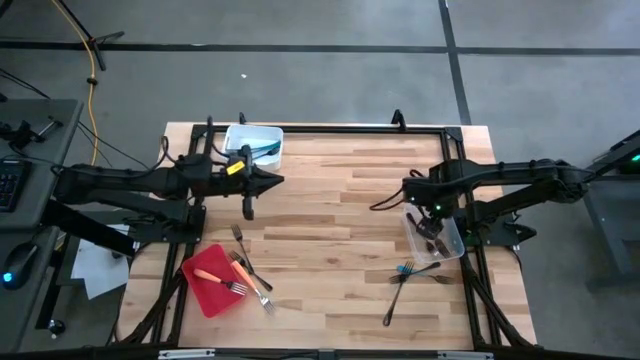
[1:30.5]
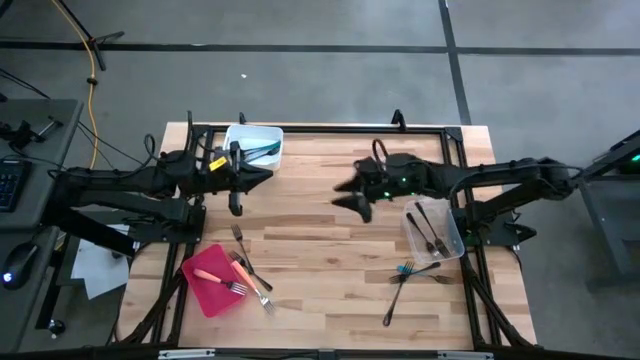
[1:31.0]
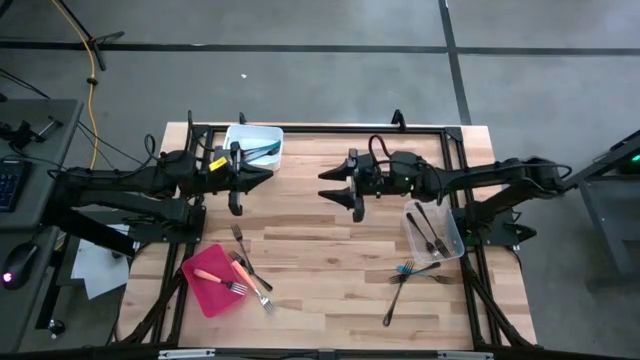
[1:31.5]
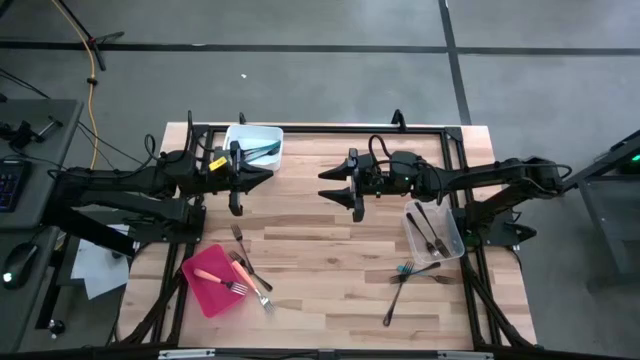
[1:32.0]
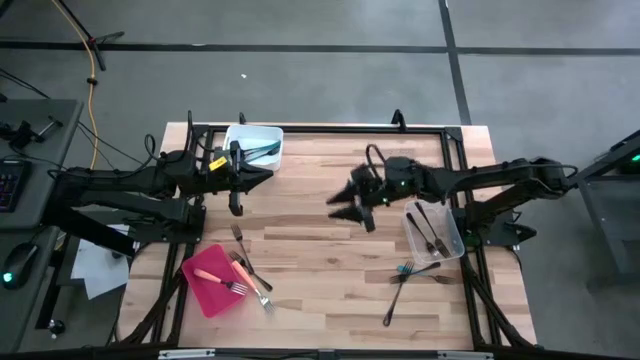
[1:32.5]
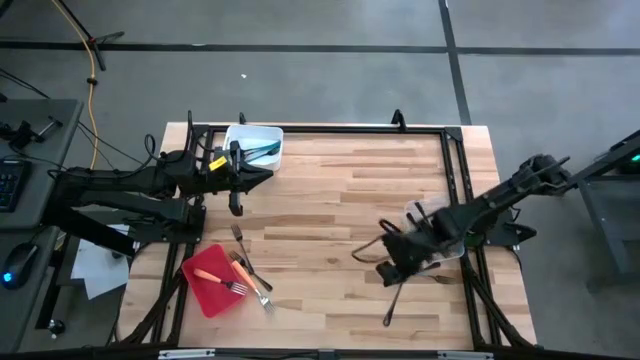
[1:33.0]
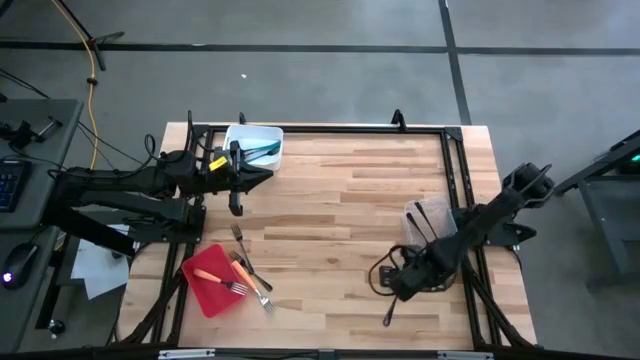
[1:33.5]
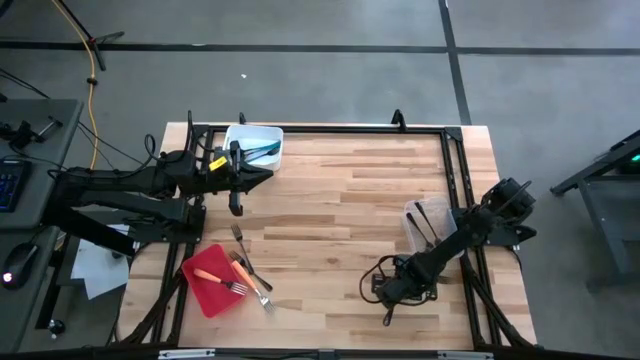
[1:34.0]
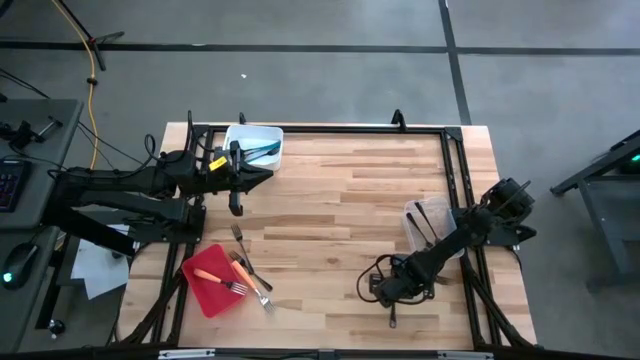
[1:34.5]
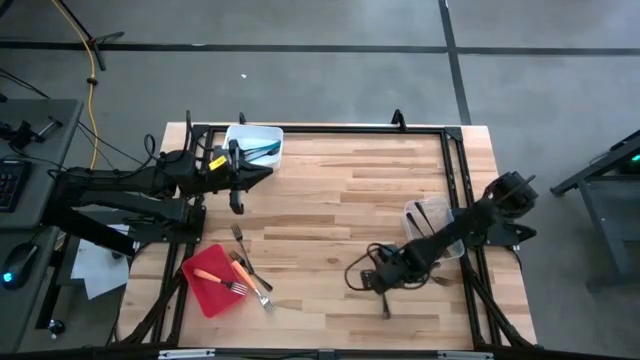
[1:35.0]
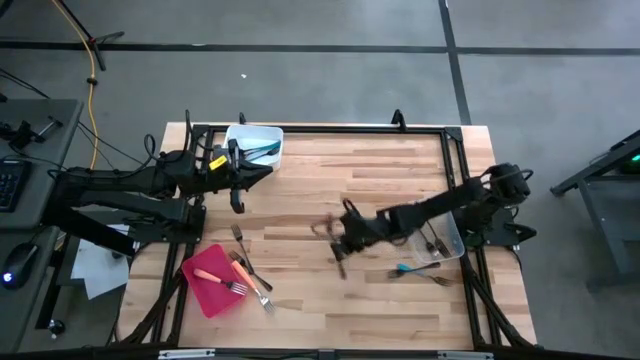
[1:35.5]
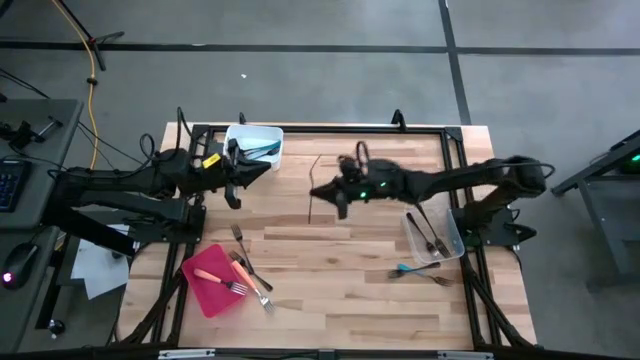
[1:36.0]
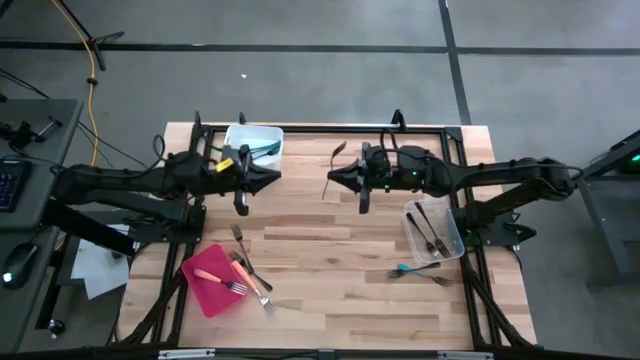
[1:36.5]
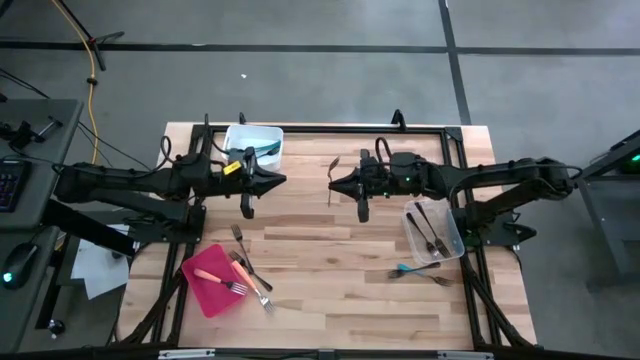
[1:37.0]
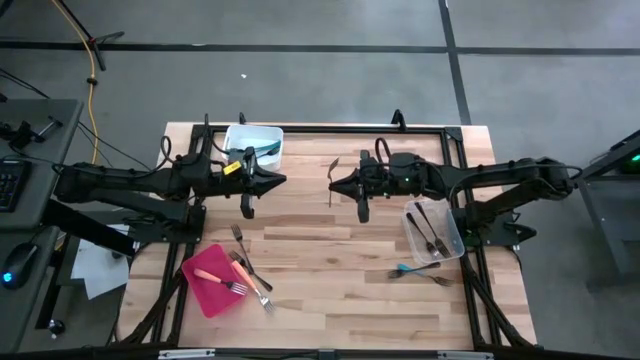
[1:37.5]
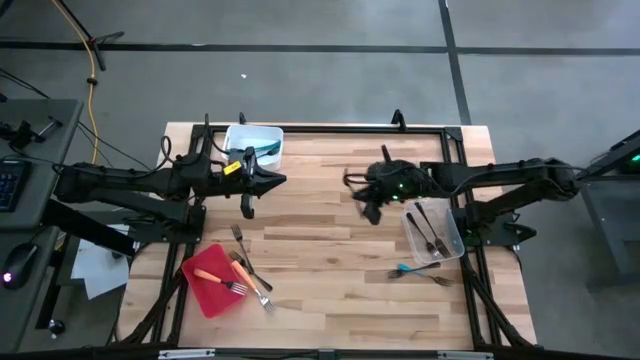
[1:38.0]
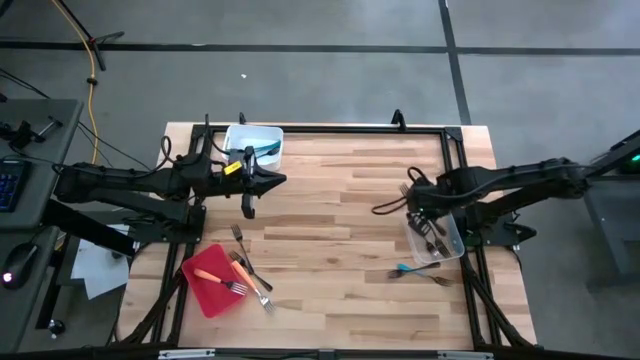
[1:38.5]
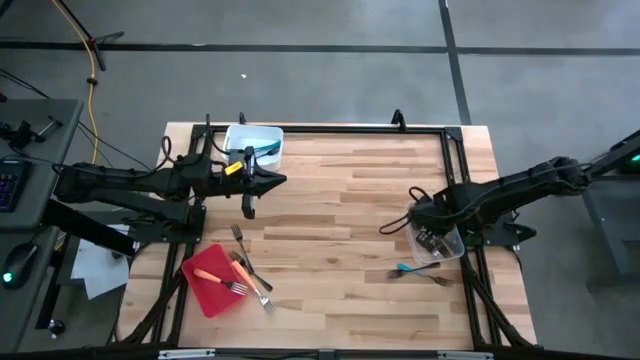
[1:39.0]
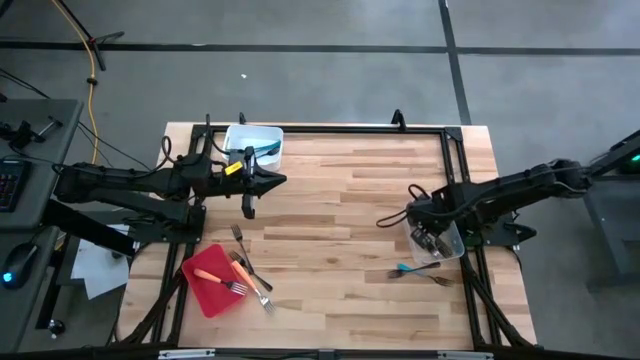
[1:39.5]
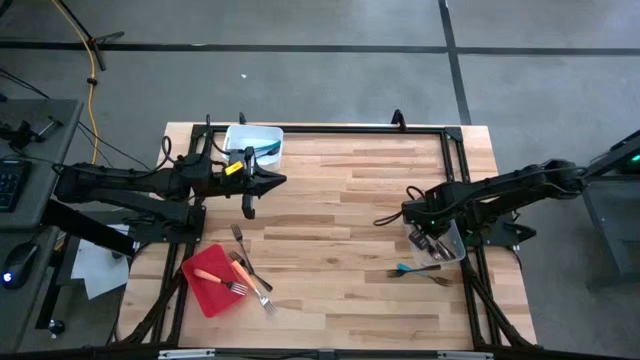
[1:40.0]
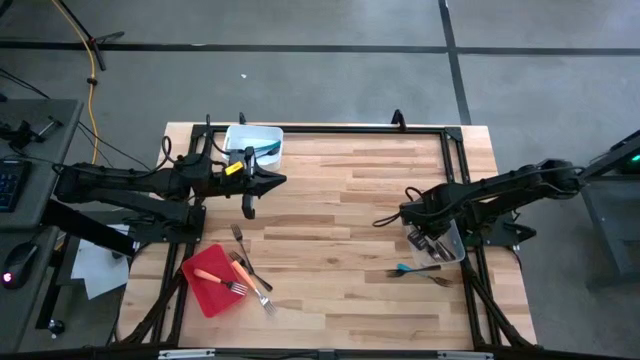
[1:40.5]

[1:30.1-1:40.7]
Task: Sort silverware by color (type)
Put the black fork into the transparent bin

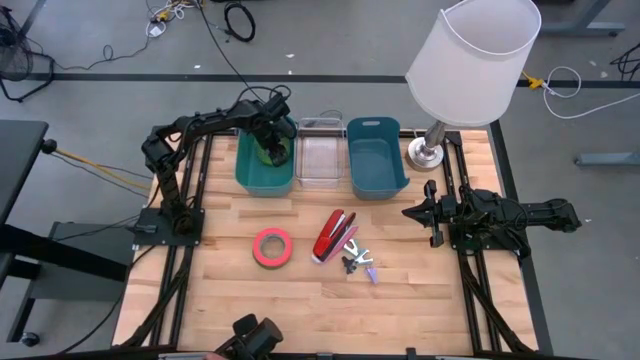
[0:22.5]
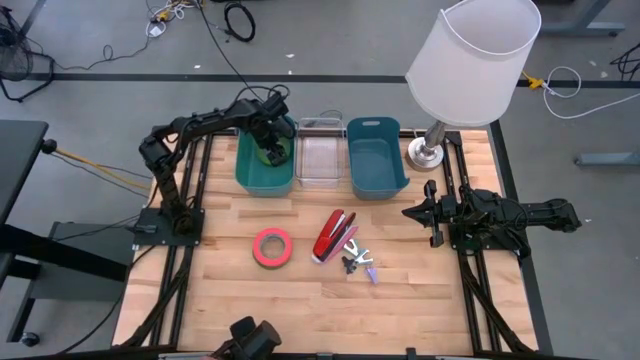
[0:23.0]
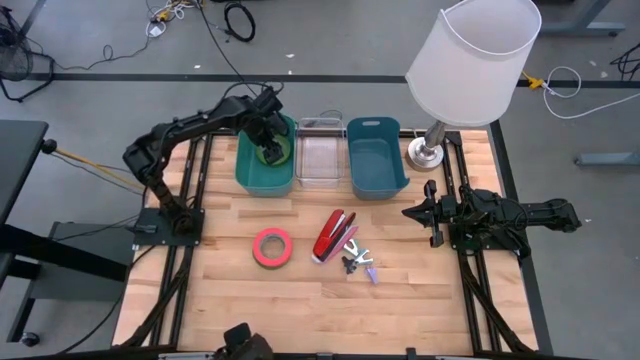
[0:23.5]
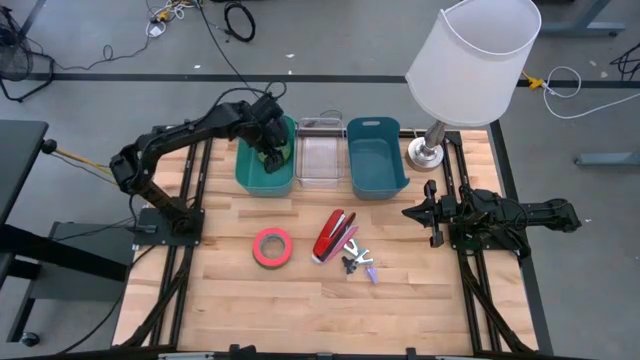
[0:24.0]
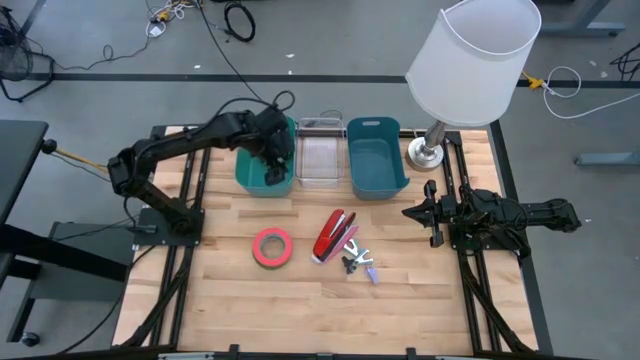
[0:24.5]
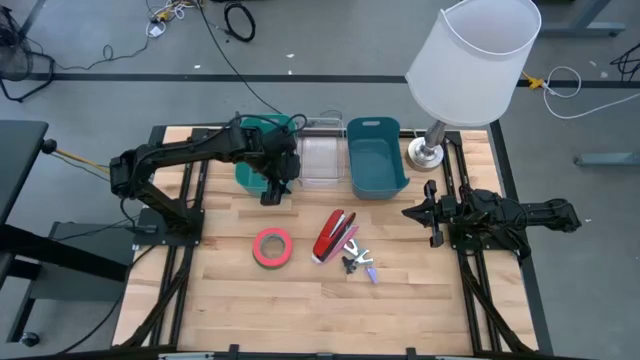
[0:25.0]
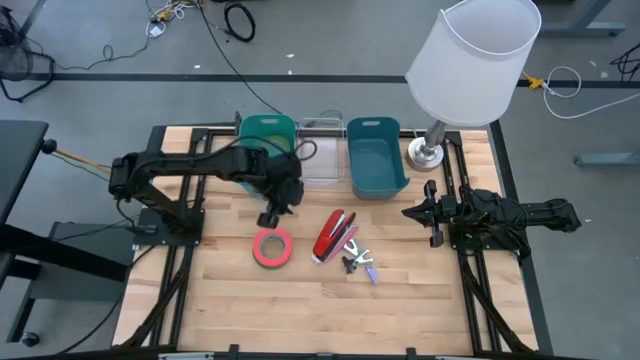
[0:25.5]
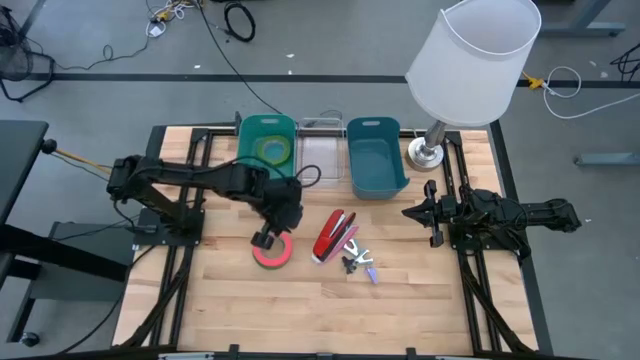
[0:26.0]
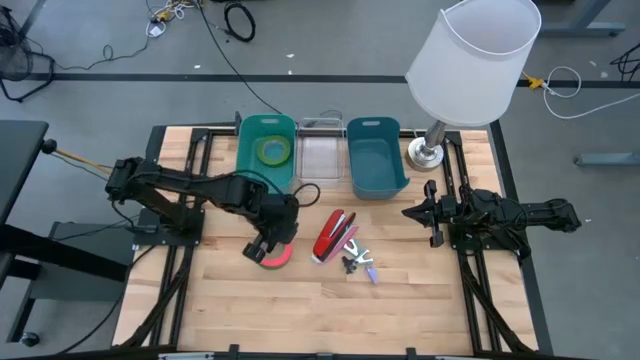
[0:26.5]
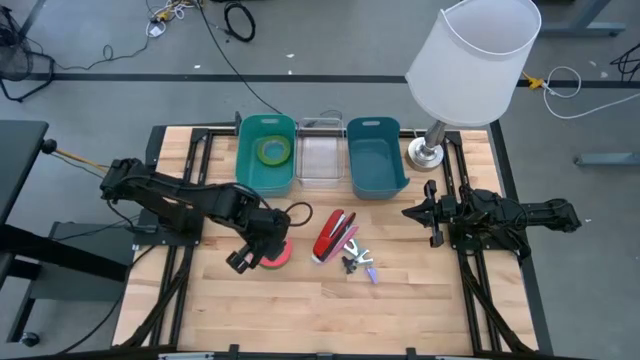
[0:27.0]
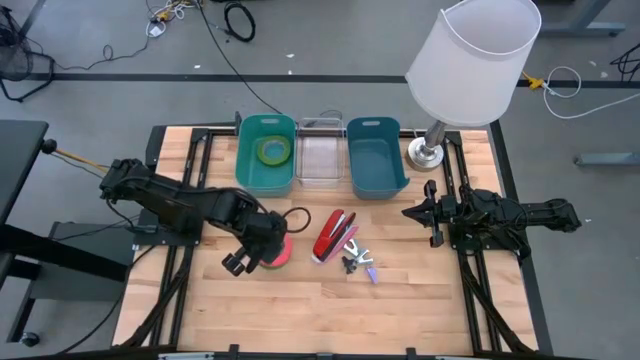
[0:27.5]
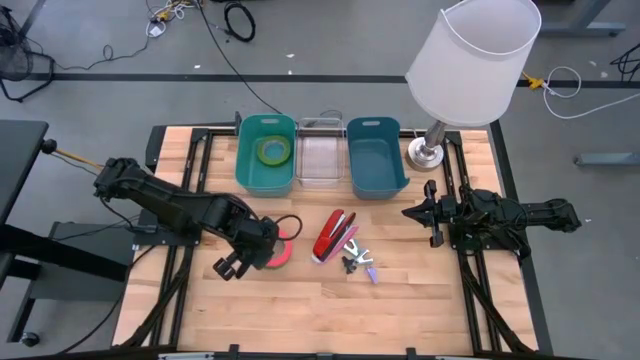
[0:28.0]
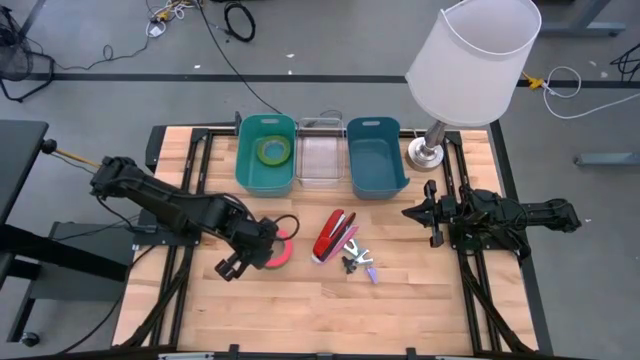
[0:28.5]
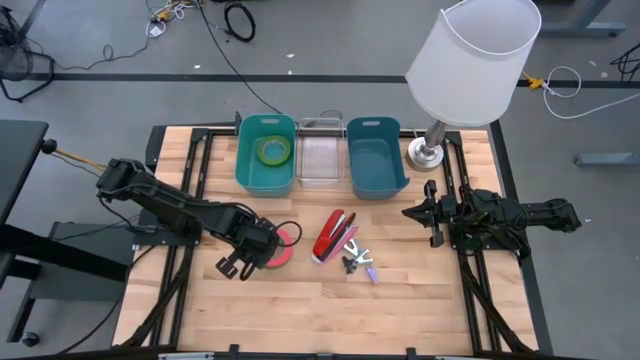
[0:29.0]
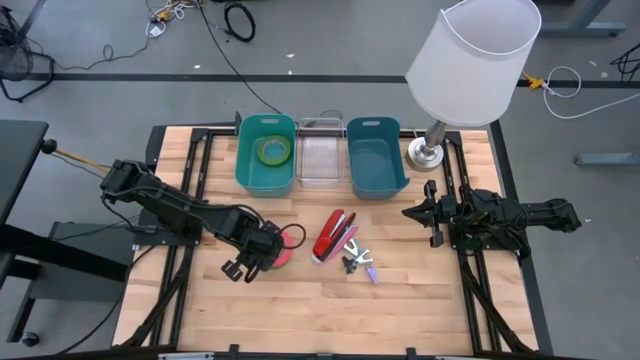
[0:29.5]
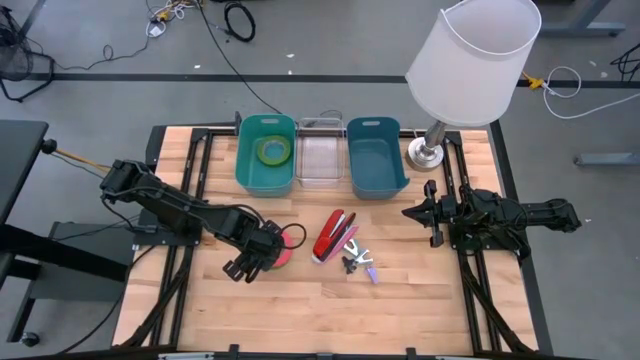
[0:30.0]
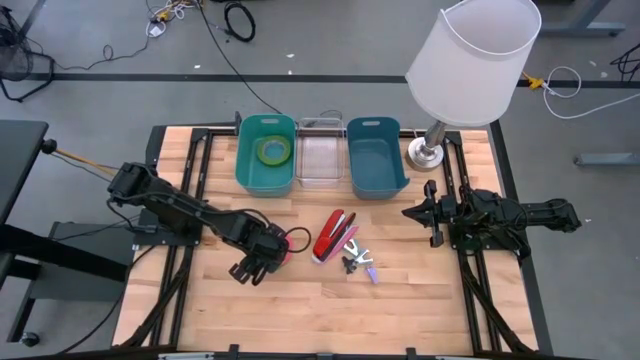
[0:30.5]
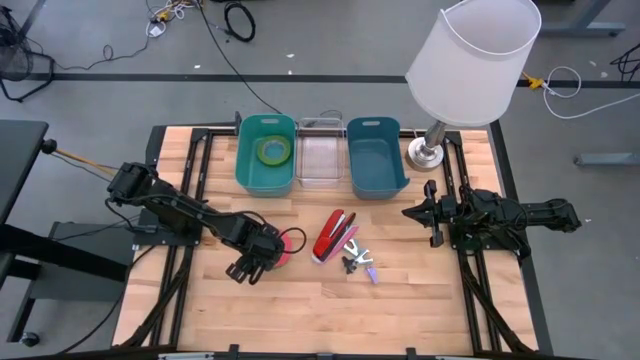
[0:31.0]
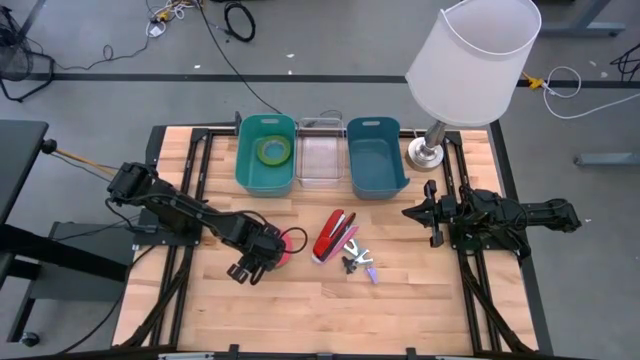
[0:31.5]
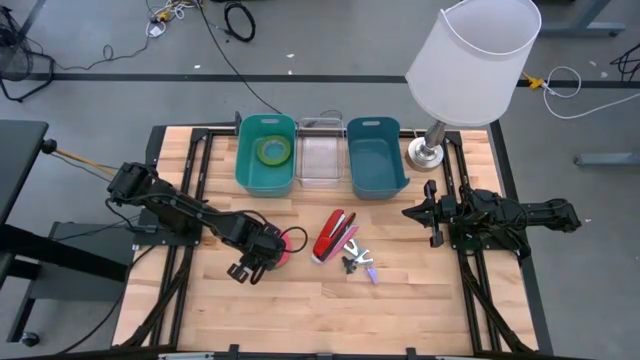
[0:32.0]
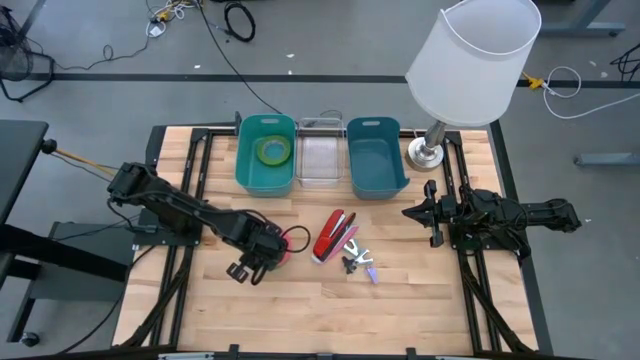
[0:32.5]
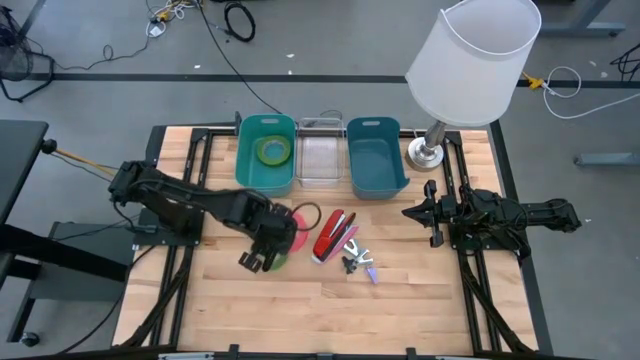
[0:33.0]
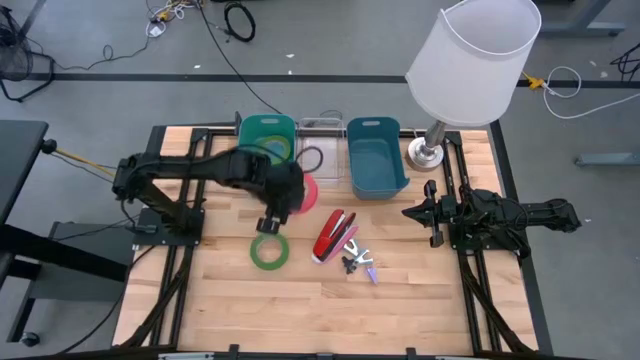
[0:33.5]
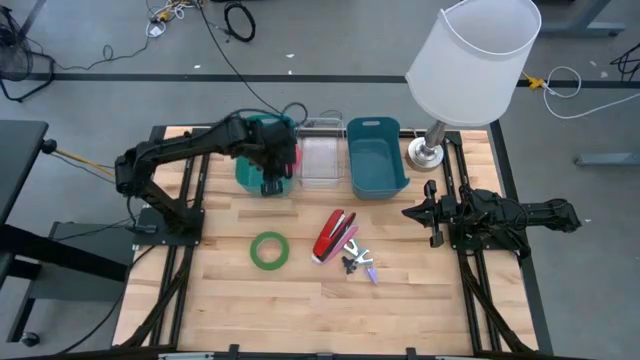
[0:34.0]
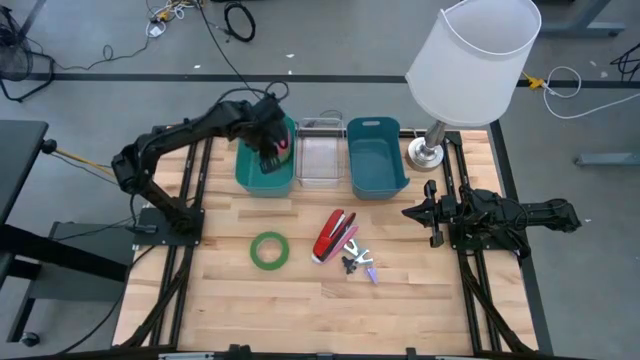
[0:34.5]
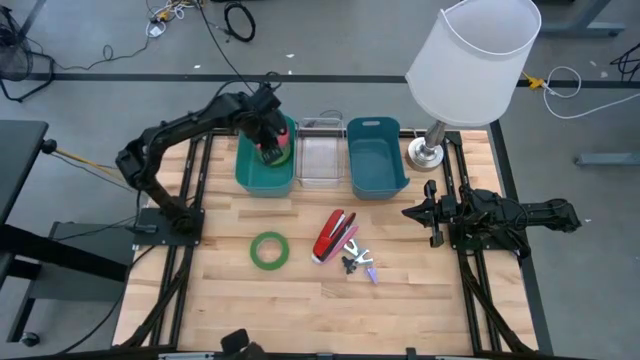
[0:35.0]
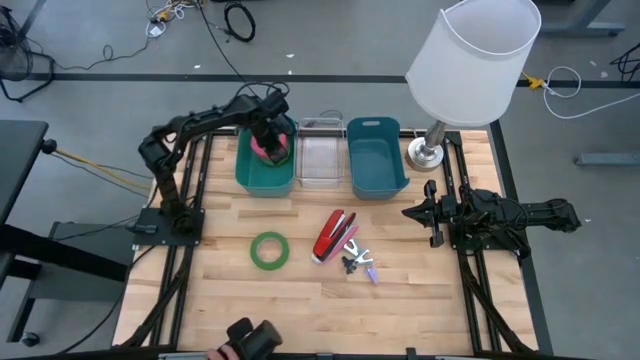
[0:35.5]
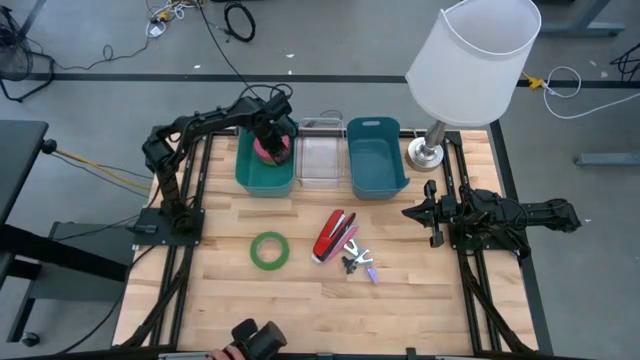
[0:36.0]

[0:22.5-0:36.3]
Task: Pick and place Stapler, Stapler remover, tape
Put the pink tape into the green bin
